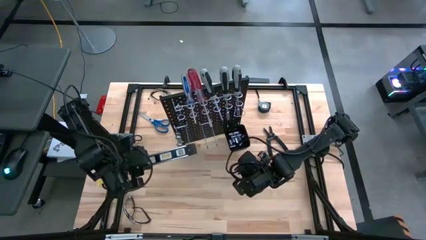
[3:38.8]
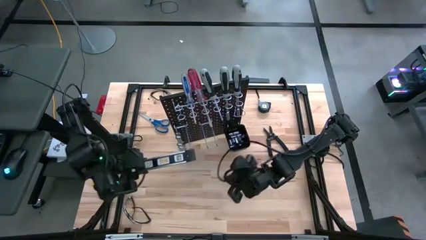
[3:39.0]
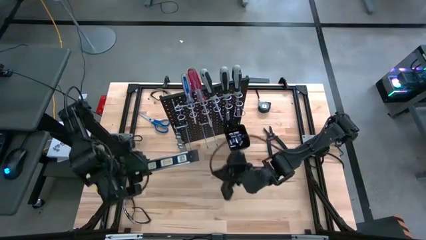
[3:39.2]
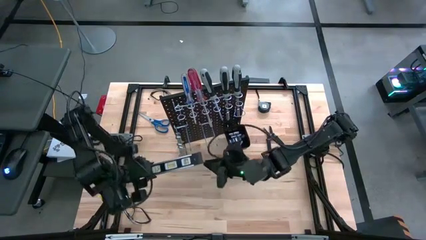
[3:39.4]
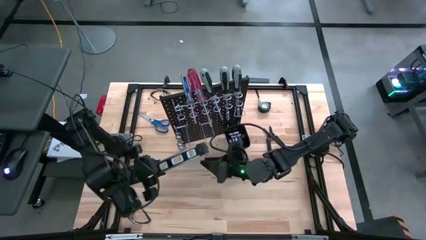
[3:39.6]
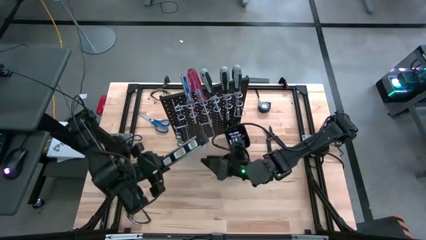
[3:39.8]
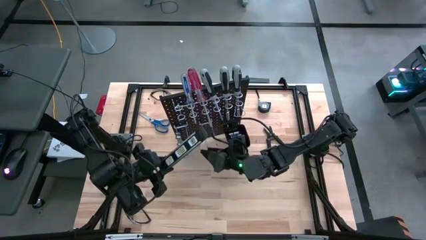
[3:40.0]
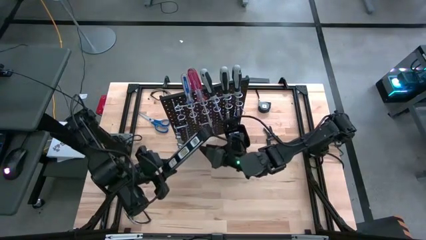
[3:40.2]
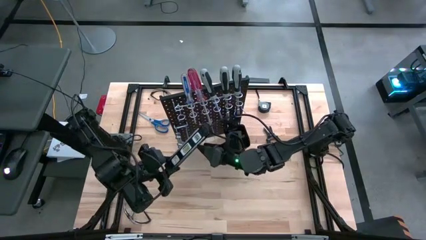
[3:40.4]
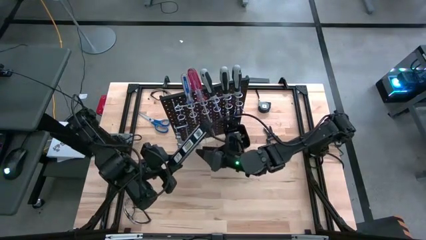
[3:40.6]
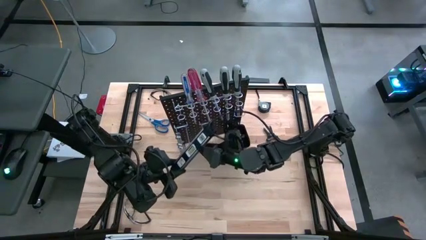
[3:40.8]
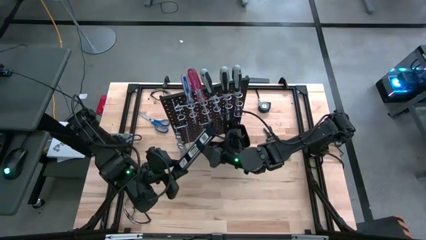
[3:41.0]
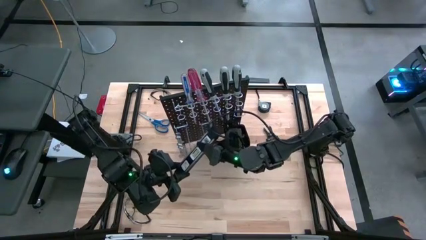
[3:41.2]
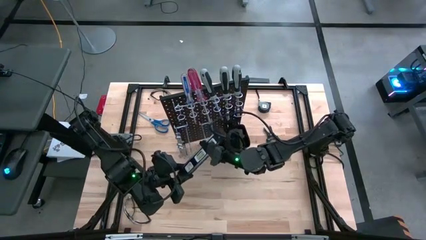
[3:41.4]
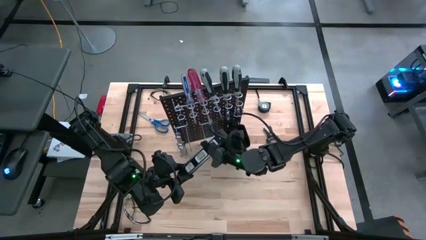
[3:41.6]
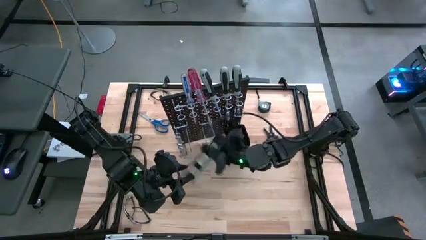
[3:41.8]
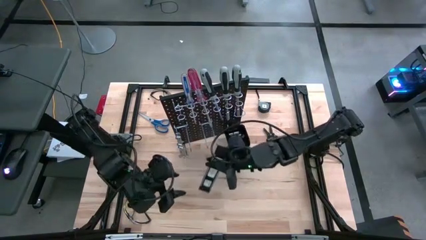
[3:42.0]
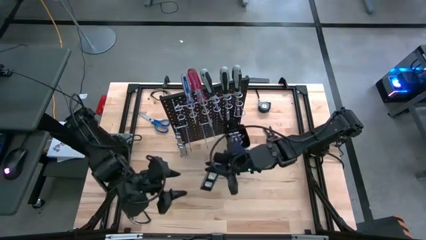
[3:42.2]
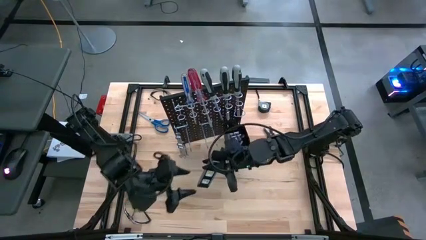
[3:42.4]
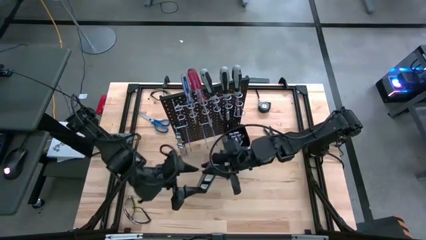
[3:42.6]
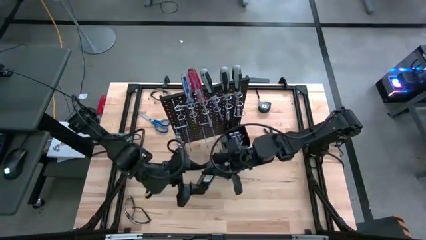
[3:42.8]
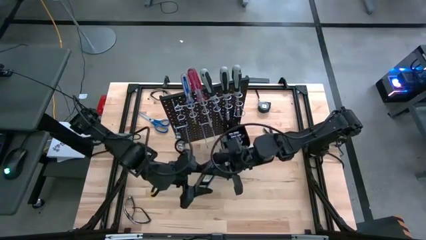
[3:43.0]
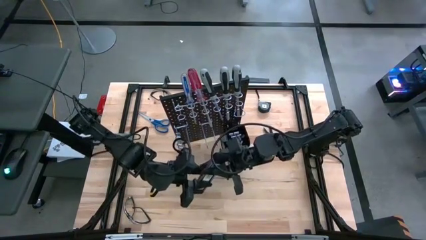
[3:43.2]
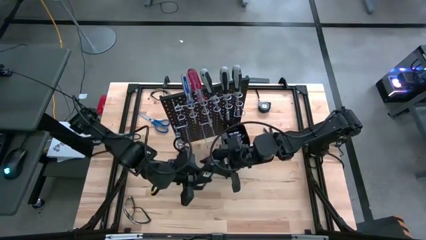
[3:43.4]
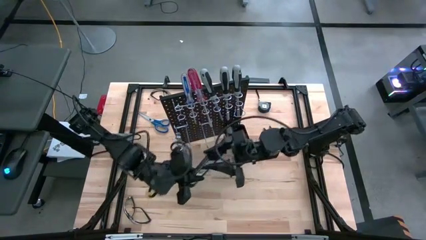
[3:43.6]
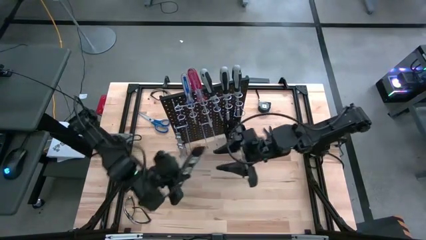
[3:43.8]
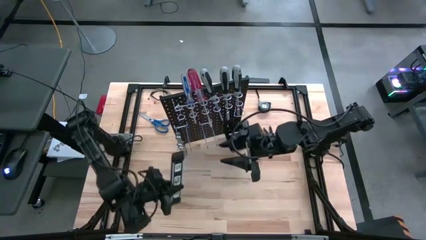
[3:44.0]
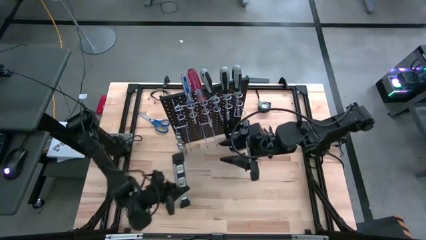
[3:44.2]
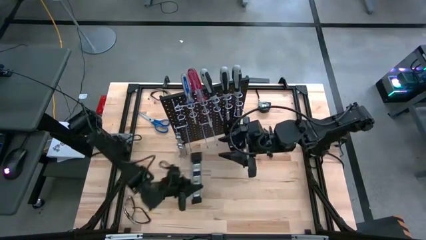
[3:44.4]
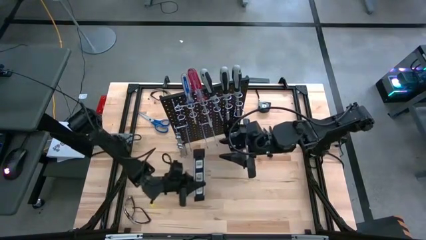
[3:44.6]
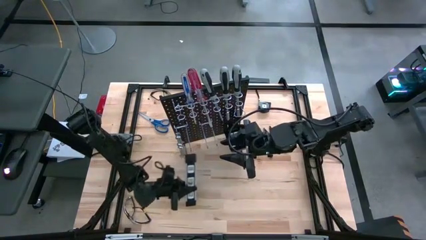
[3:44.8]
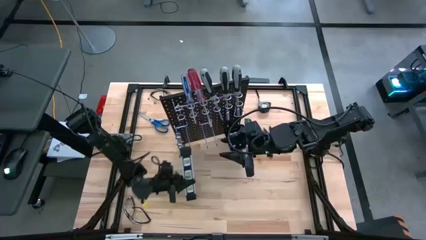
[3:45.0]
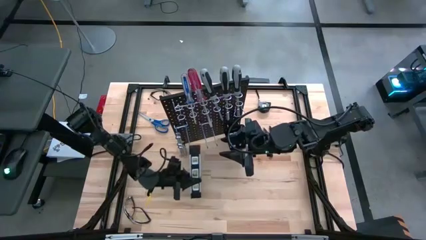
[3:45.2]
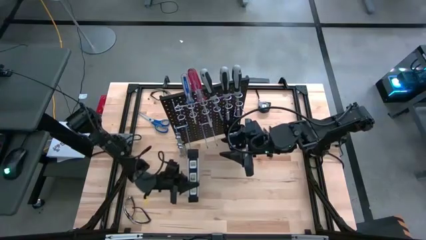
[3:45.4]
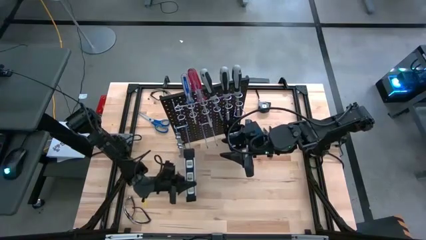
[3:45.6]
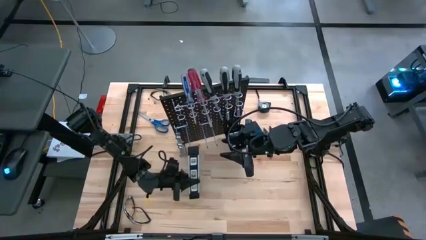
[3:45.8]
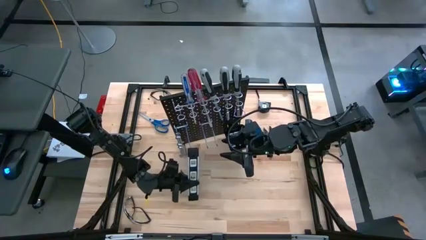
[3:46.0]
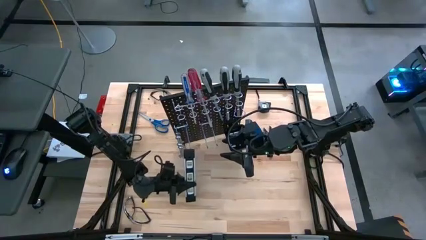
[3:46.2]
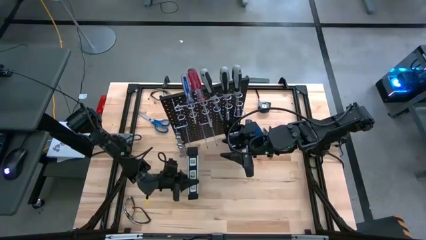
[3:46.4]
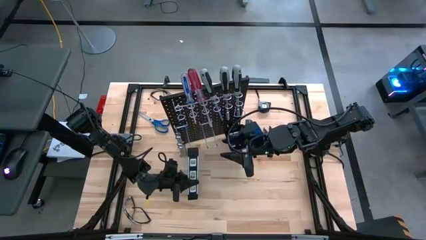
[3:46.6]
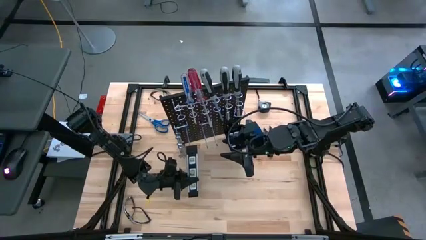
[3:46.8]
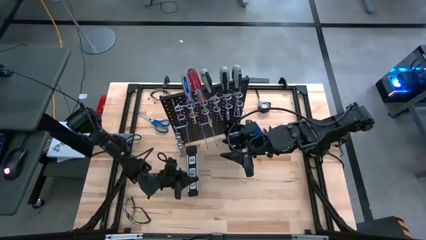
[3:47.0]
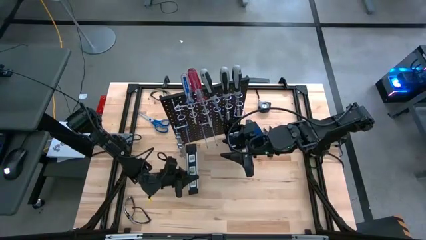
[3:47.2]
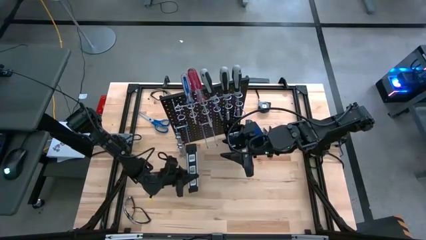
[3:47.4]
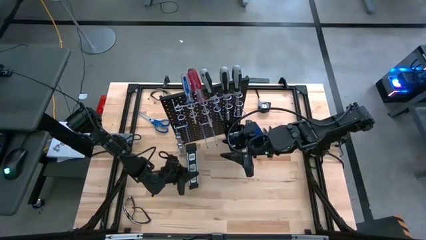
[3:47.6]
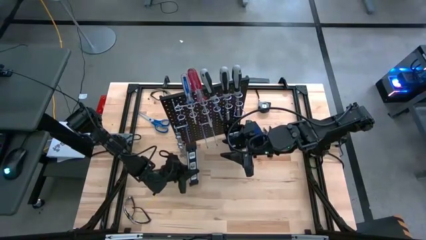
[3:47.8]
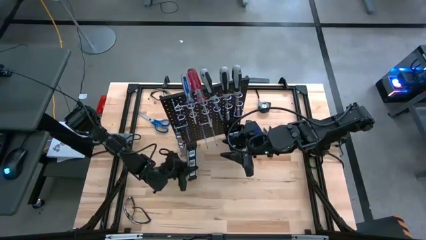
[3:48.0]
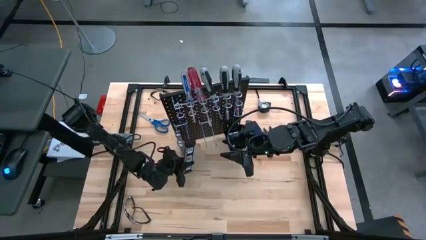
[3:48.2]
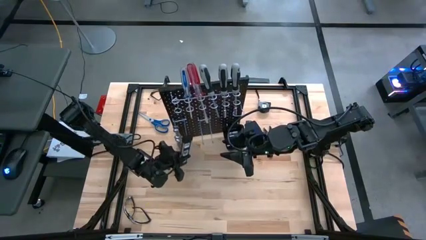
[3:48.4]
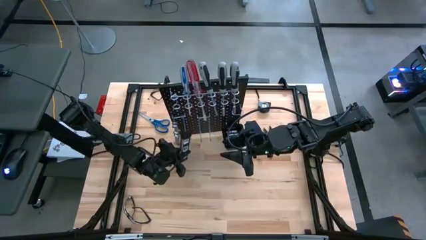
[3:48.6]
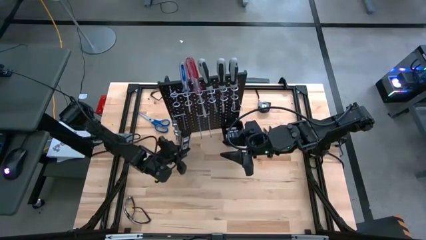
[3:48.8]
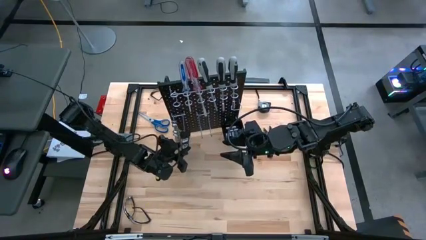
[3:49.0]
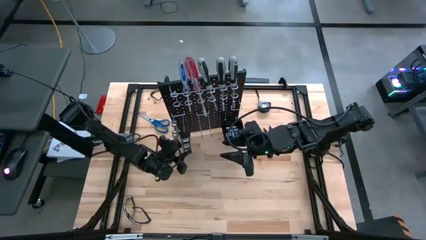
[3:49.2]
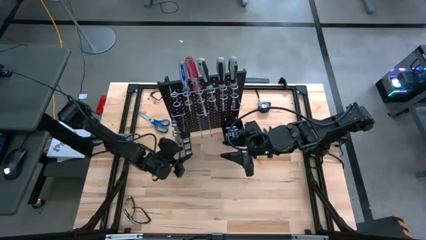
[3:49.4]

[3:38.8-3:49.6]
Task: Hang tools onto peg board
Hang the black spirit level on the pegboard

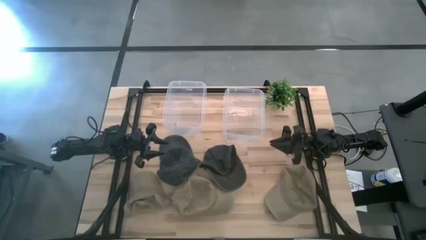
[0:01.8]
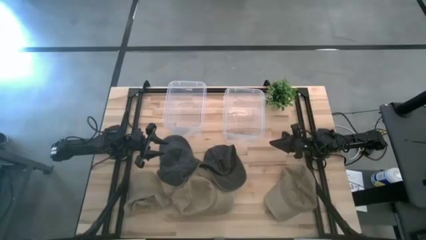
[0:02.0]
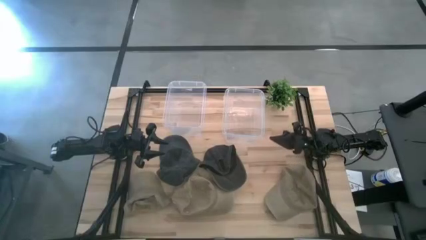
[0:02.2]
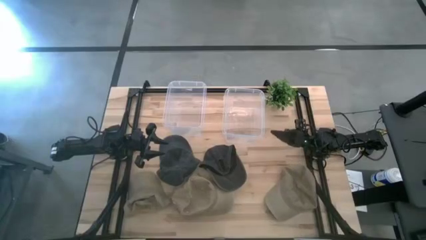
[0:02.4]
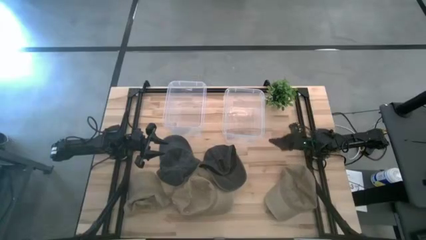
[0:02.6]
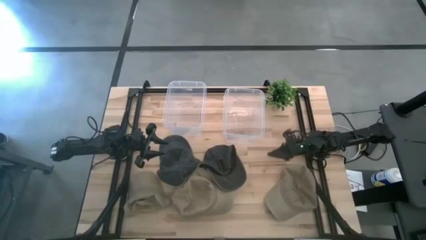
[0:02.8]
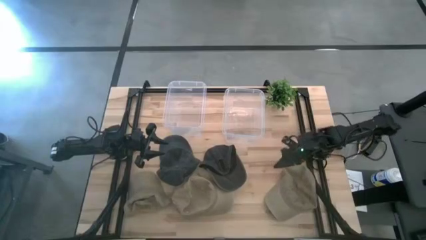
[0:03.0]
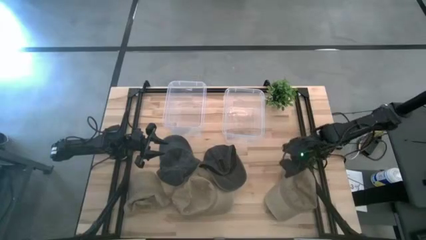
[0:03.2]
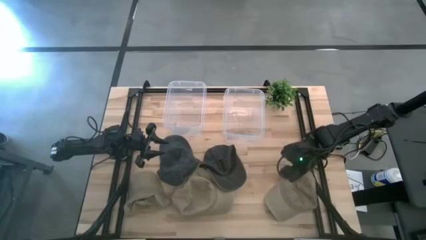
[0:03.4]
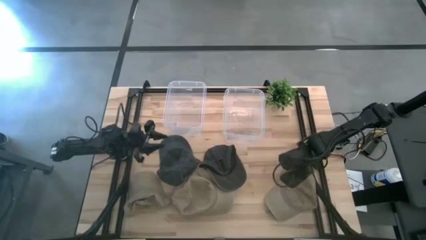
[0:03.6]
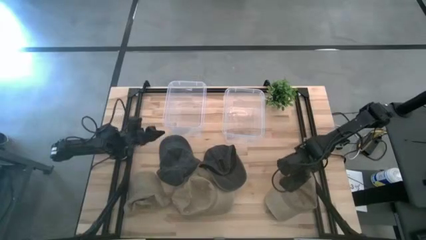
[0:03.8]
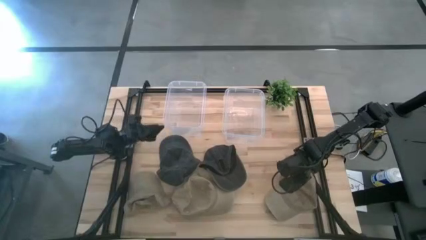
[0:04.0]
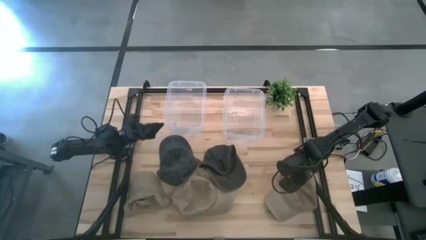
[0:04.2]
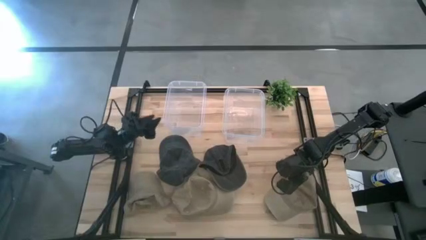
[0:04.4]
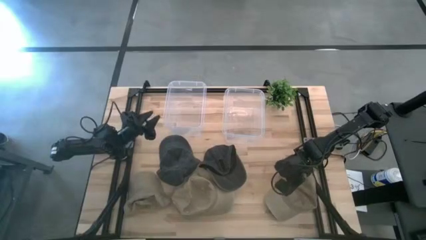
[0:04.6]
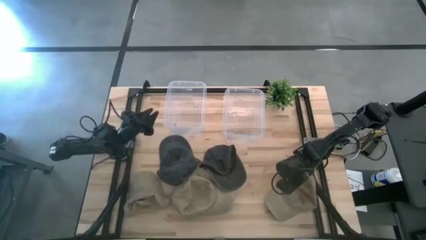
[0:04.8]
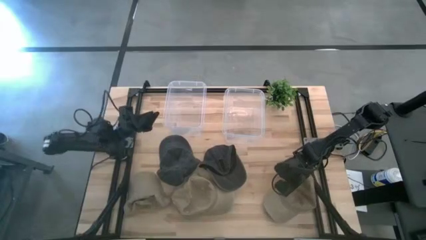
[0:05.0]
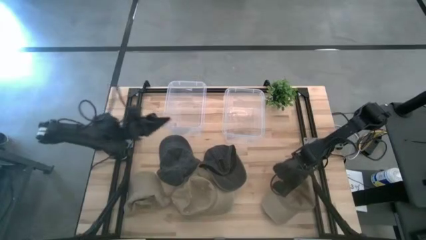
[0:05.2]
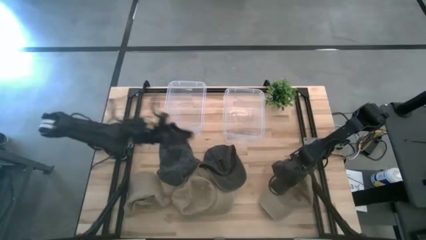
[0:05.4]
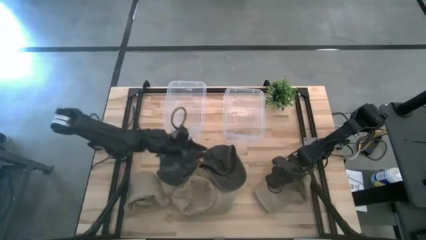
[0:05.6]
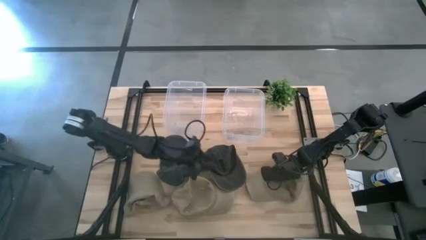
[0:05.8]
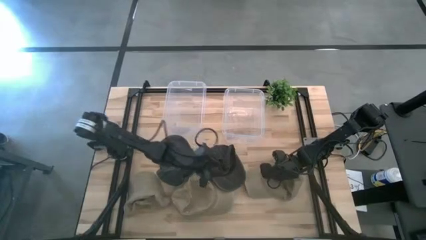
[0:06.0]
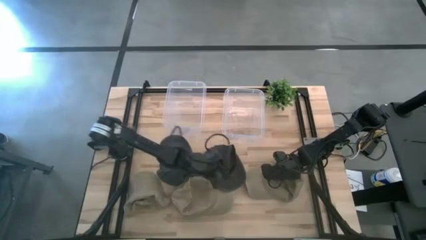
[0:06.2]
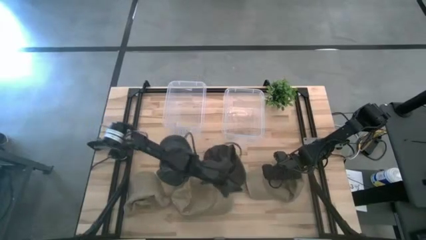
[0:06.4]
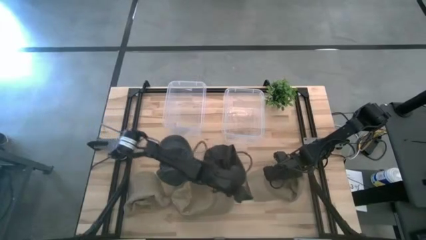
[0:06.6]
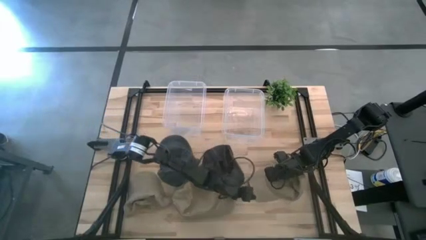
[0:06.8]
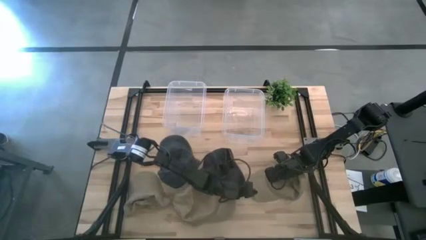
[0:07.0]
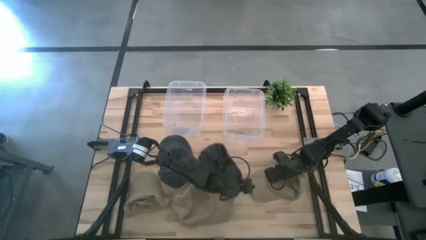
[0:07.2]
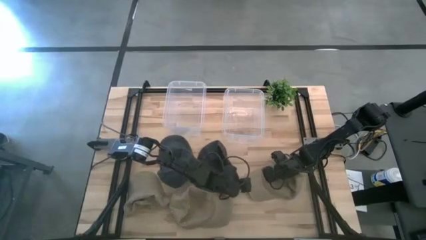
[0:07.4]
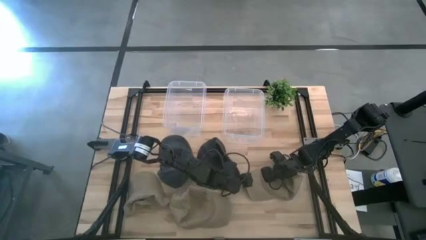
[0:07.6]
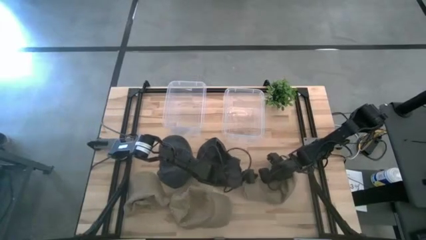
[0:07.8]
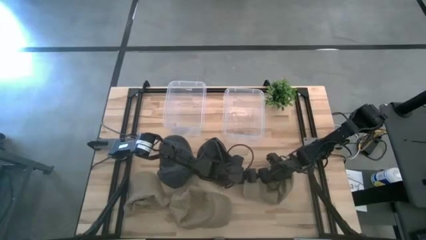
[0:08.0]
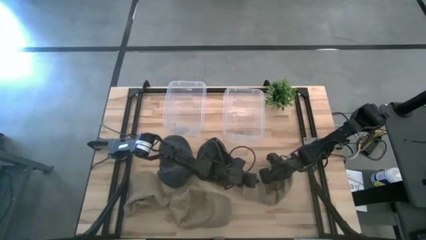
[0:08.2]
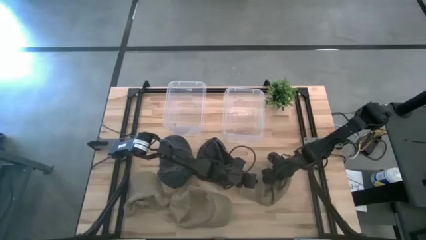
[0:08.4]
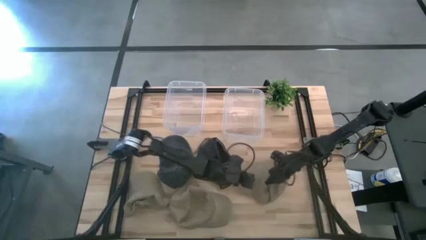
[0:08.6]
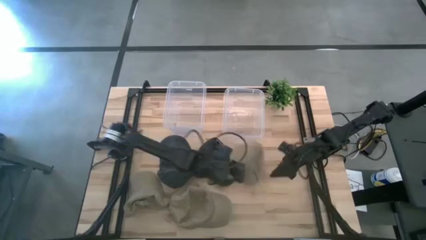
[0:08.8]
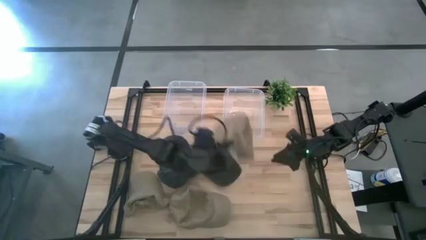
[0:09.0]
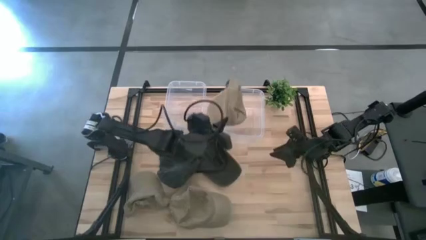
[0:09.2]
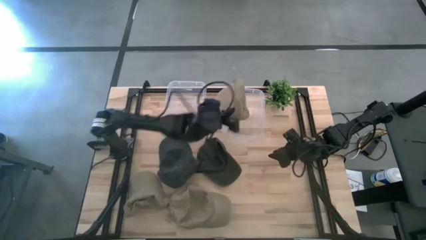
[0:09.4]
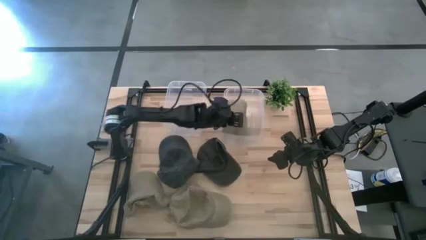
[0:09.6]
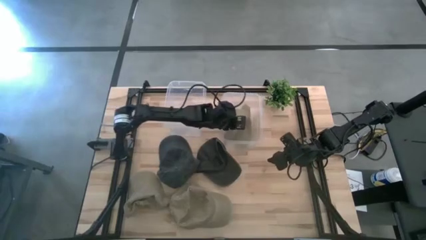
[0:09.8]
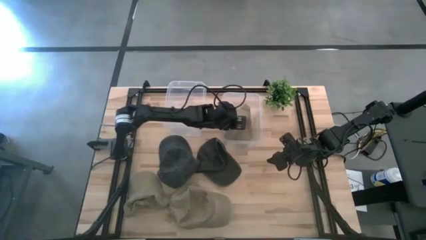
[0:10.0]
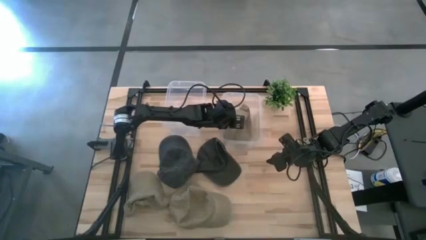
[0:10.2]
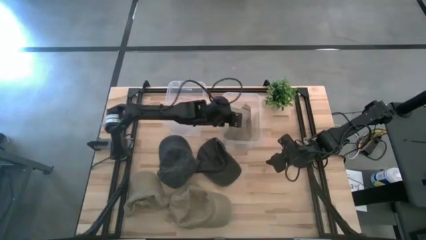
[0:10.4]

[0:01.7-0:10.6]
Task: Pick & Place hat
Put the right brown cap into the right transparent bin
